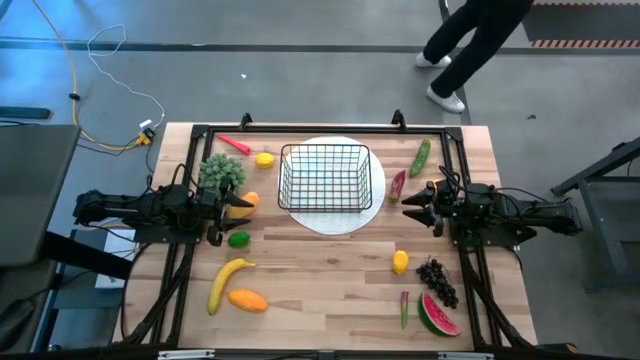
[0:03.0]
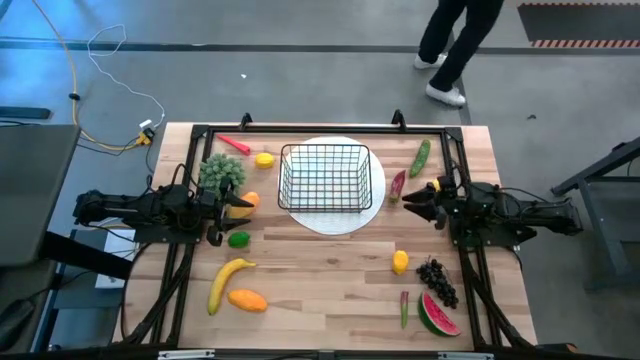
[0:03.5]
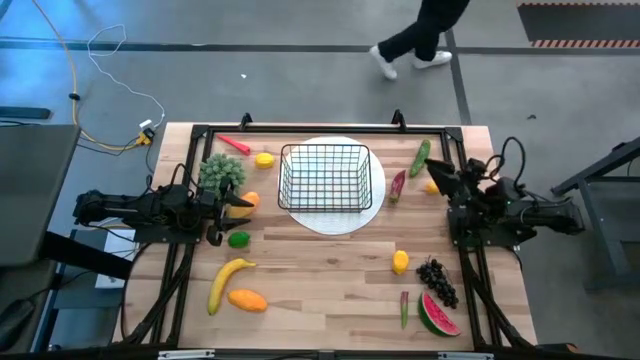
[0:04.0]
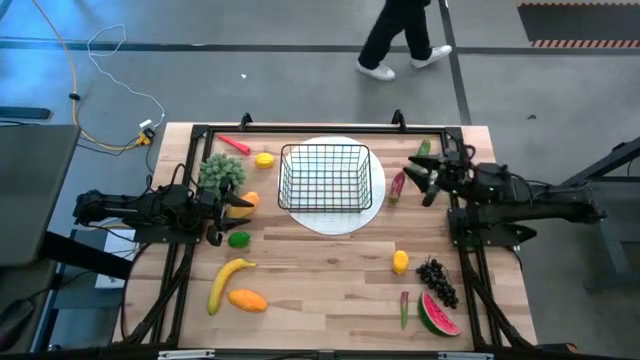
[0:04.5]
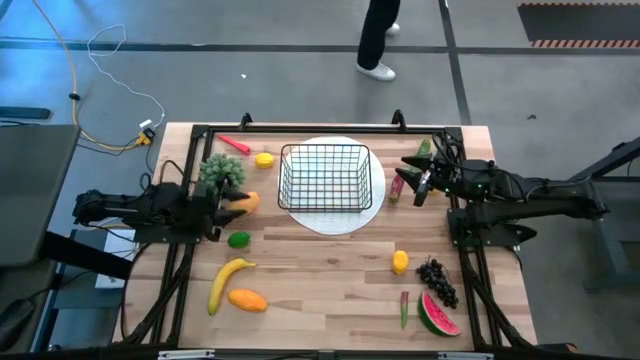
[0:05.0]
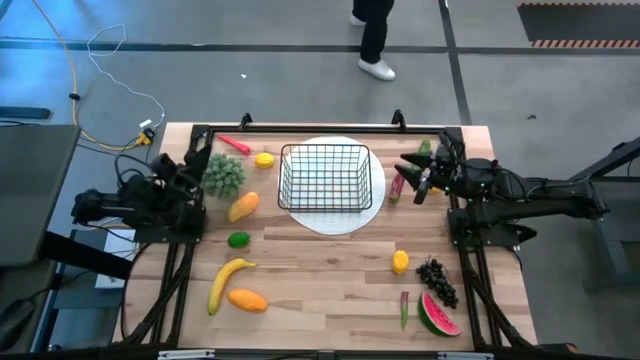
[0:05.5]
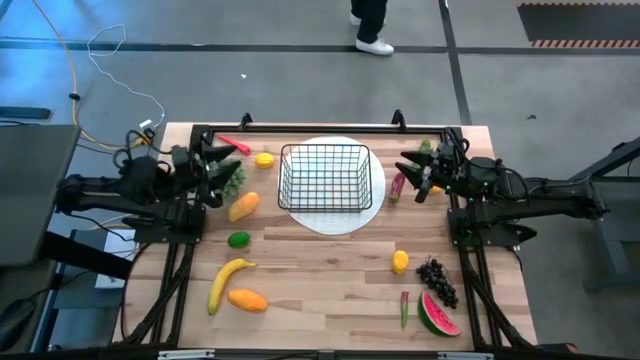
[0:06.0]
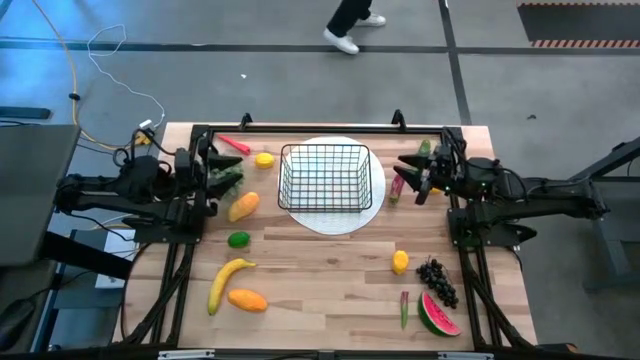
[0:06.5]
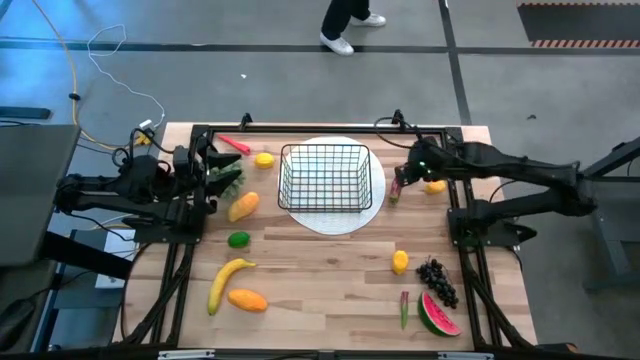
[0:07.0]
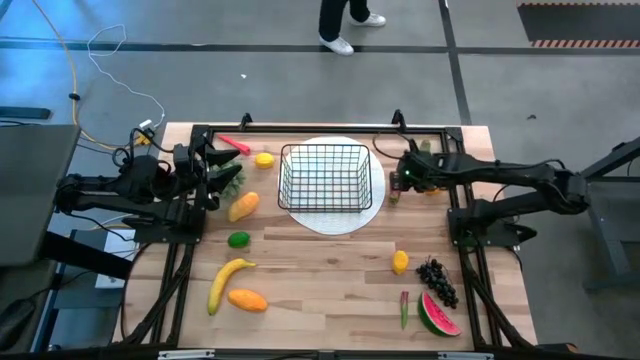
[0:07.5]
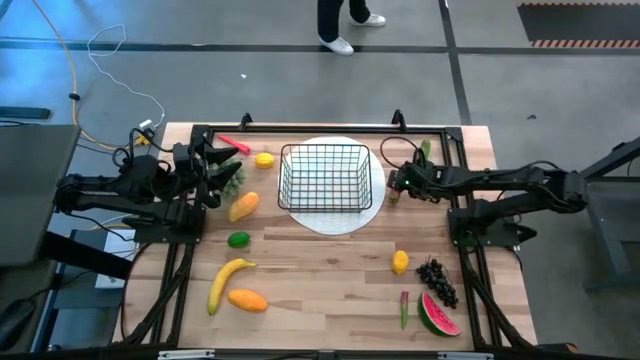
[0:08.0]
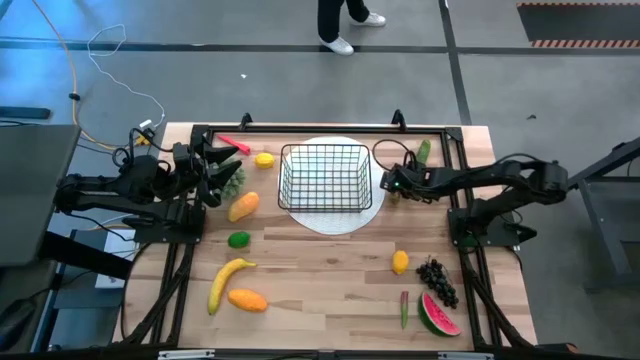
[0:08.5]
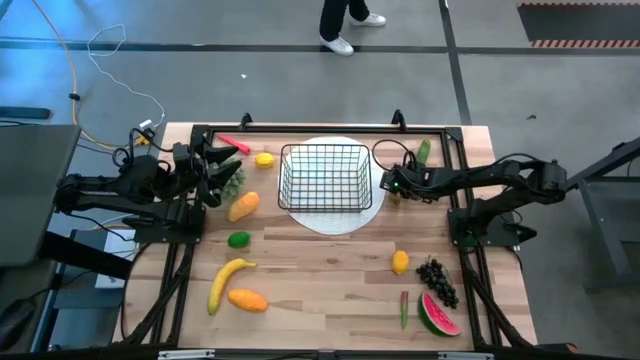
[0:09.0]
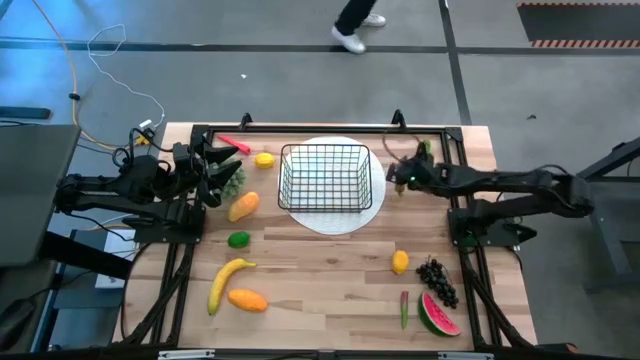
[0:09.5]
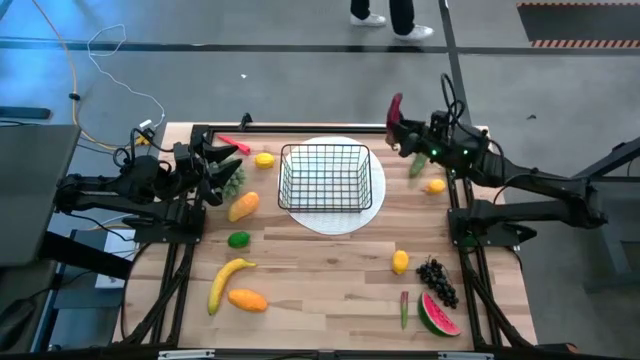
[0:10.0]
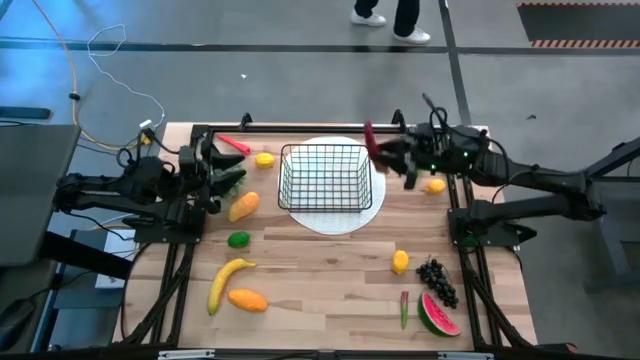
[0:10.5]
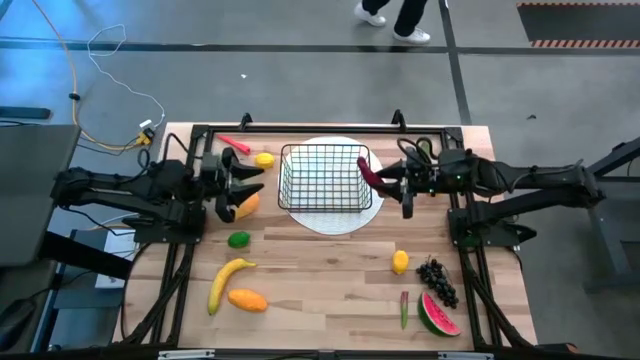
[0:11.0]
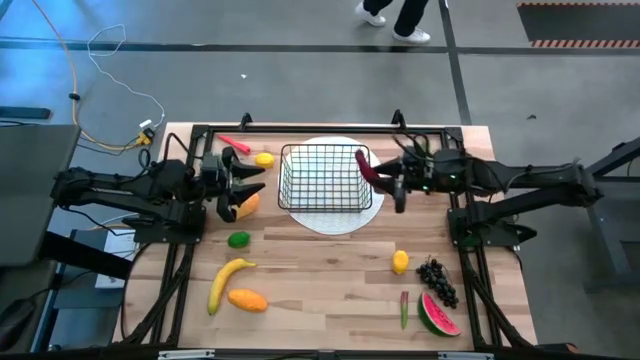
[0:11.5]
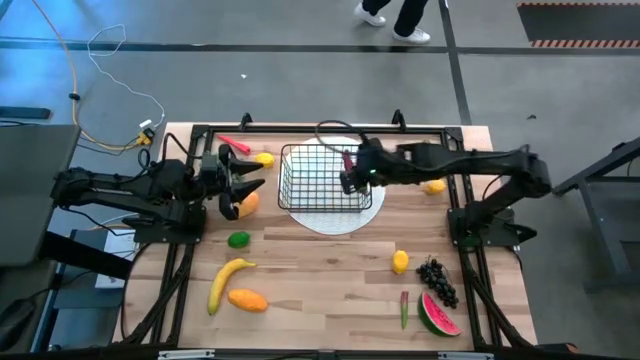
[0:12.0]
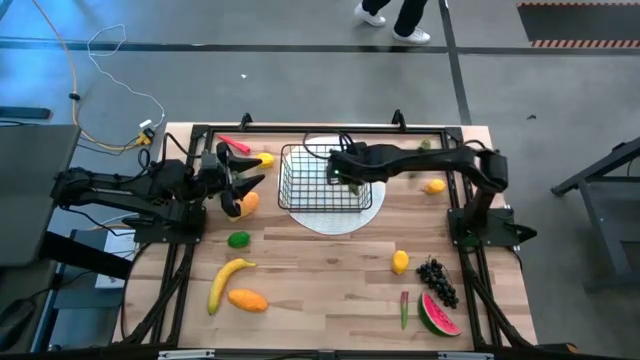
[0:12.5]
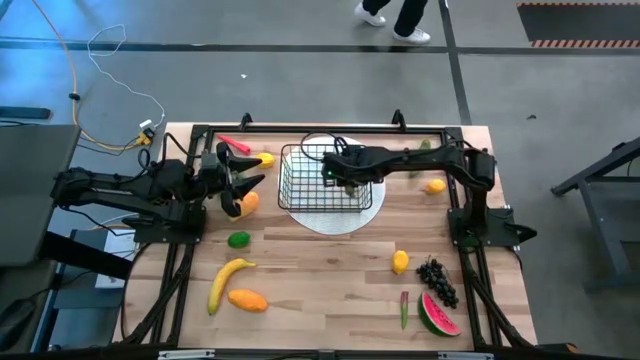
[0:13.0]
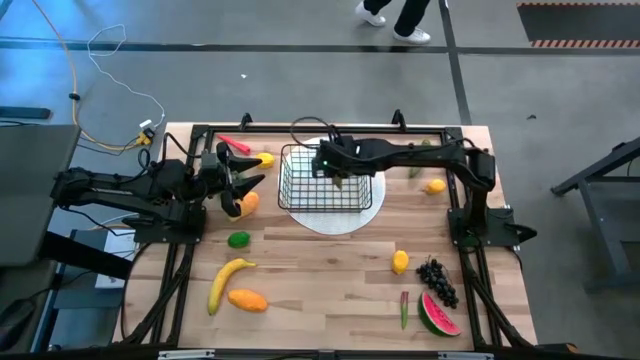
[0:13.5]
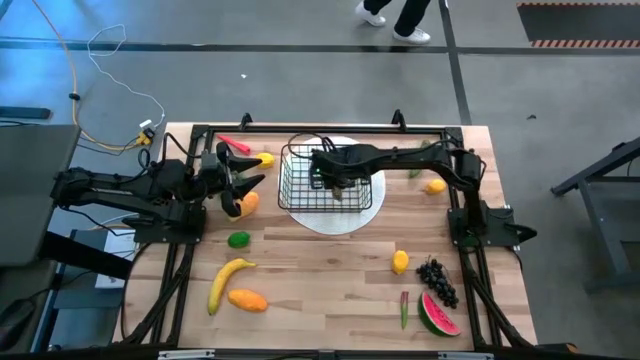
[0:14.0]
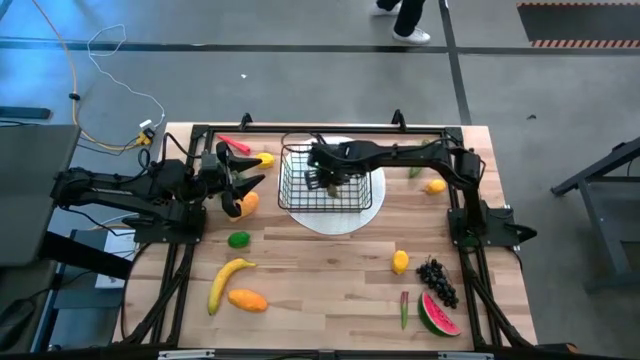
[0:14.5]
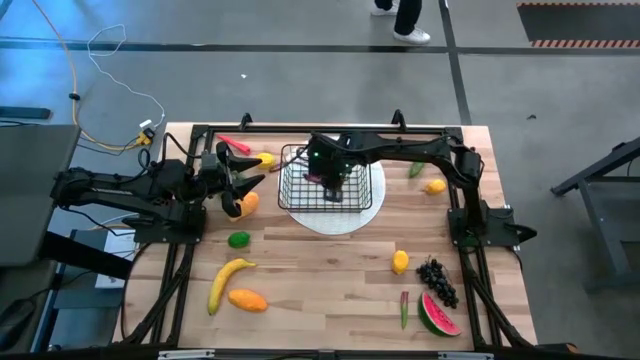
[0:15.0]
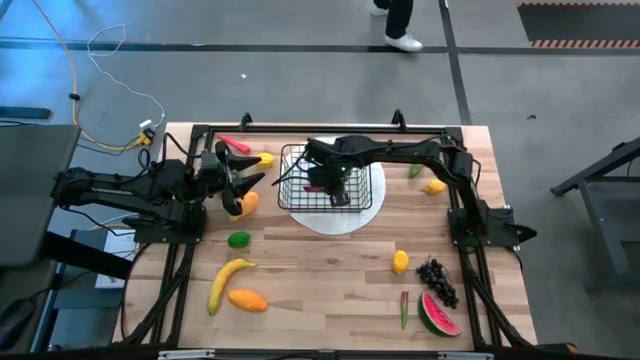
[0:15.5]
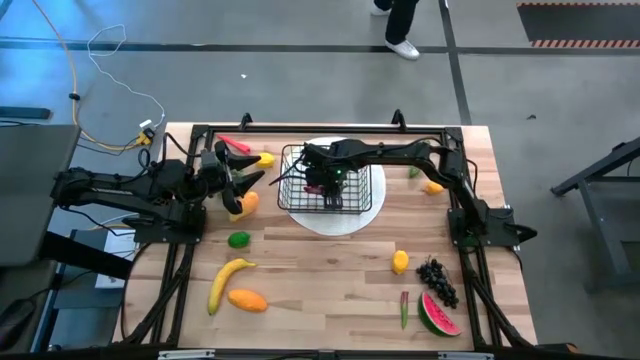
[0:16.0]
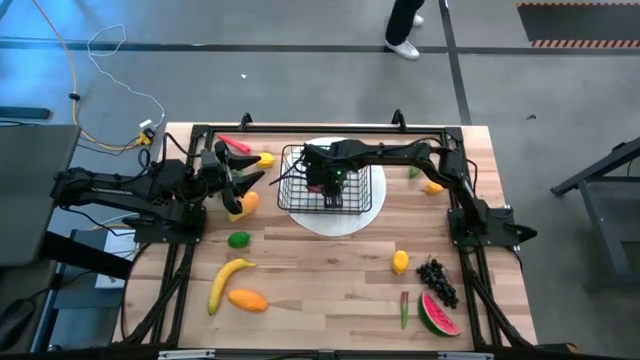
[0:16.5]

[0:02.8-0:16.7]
Task: Build produce basket
Put the red chili pepper into the wire basket

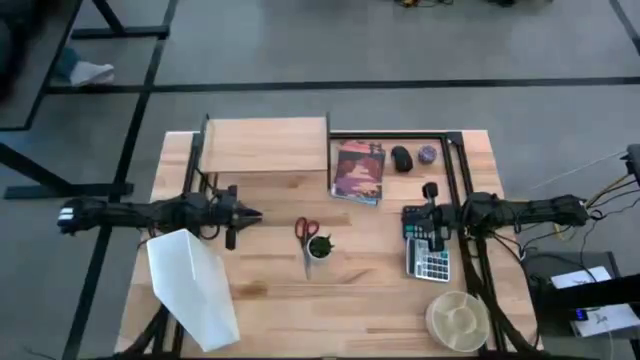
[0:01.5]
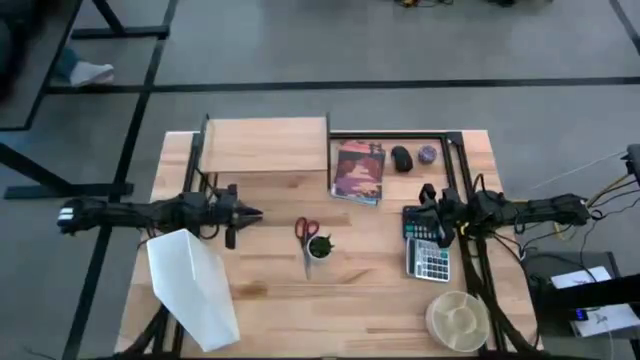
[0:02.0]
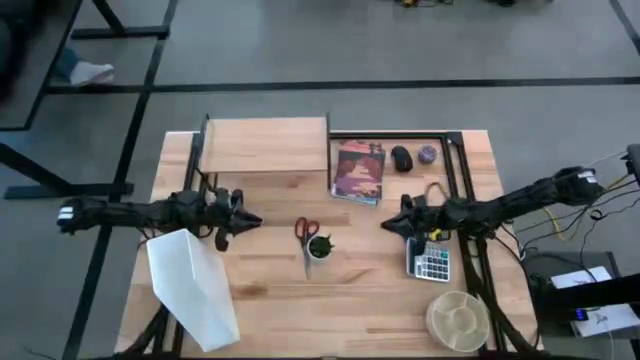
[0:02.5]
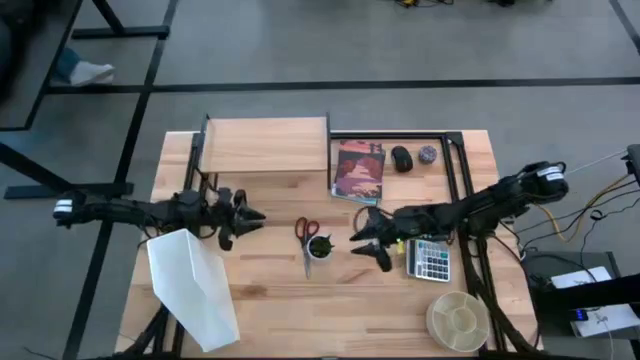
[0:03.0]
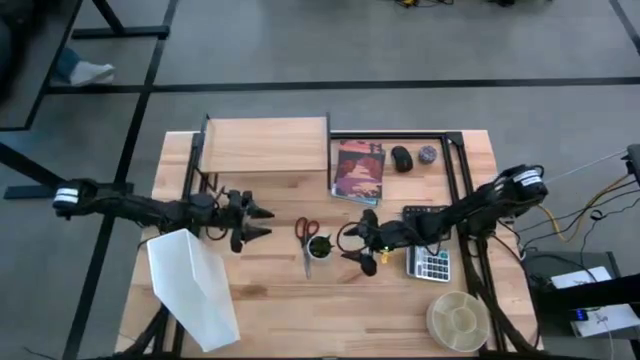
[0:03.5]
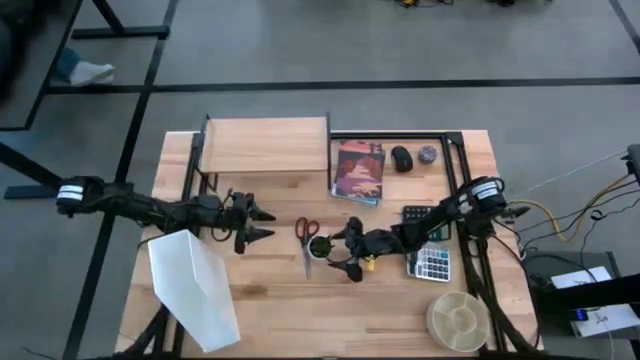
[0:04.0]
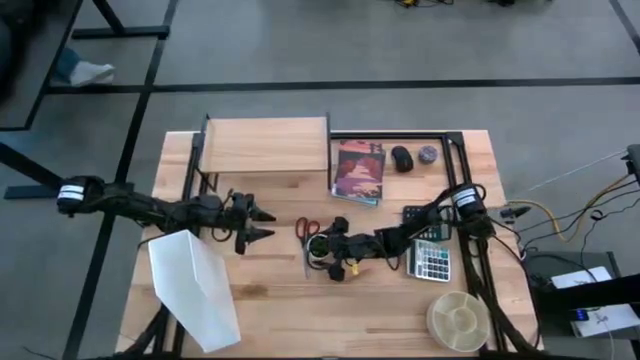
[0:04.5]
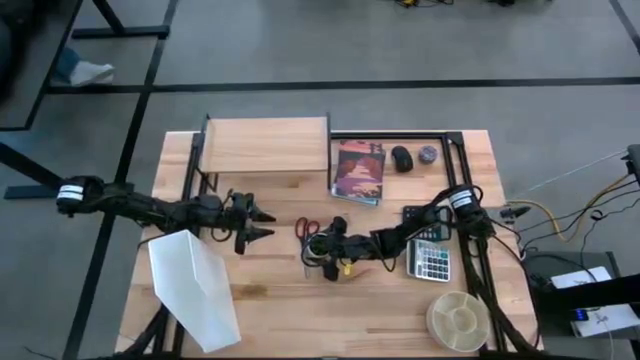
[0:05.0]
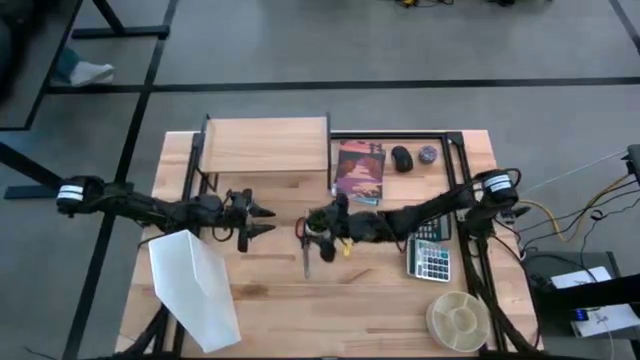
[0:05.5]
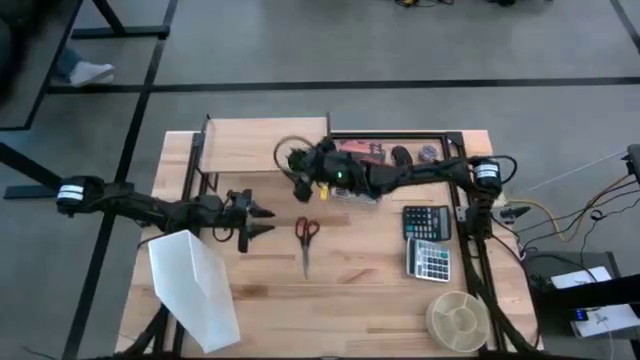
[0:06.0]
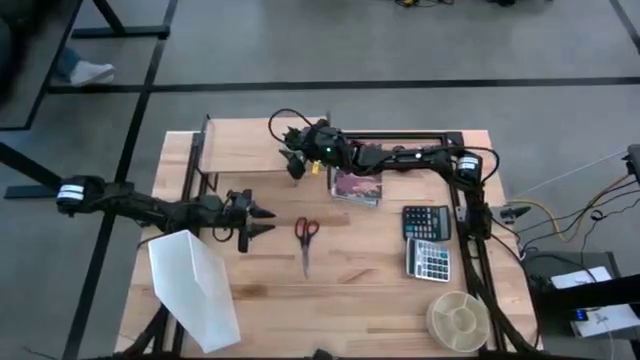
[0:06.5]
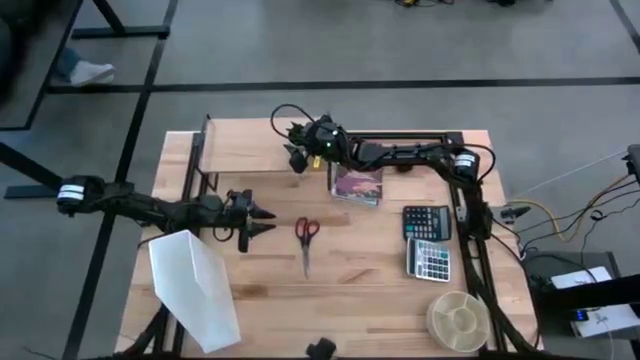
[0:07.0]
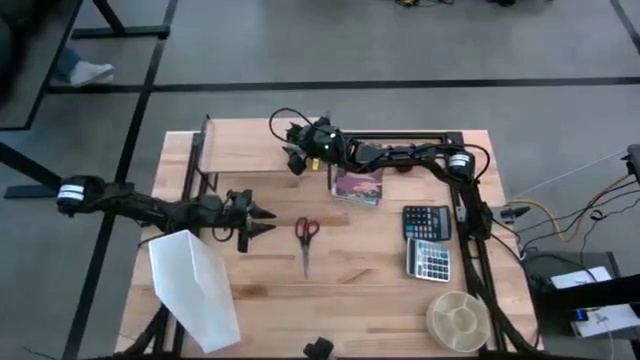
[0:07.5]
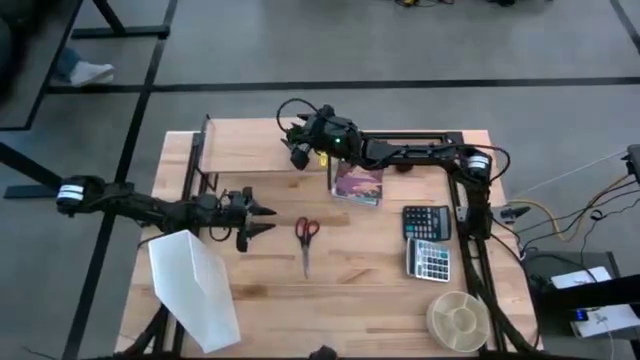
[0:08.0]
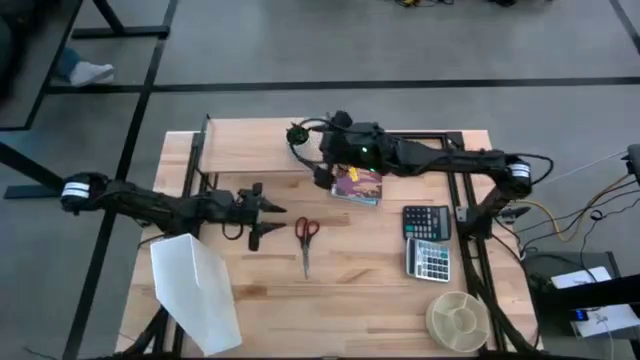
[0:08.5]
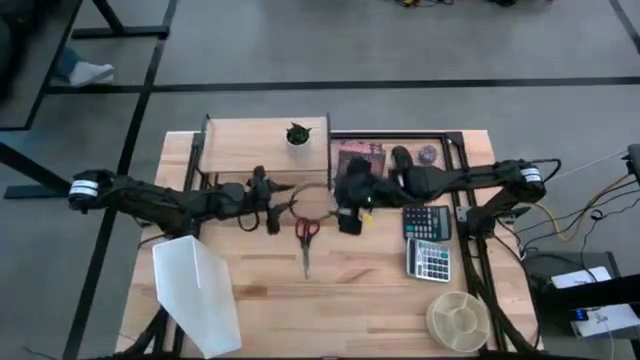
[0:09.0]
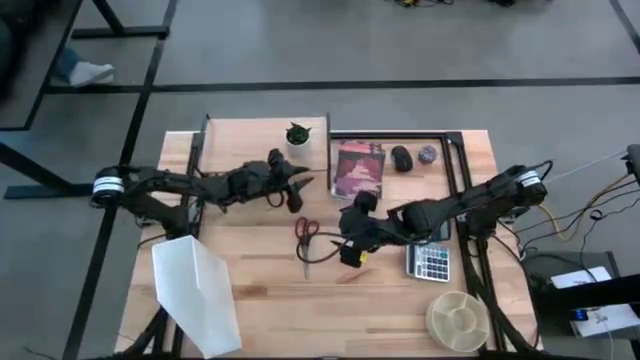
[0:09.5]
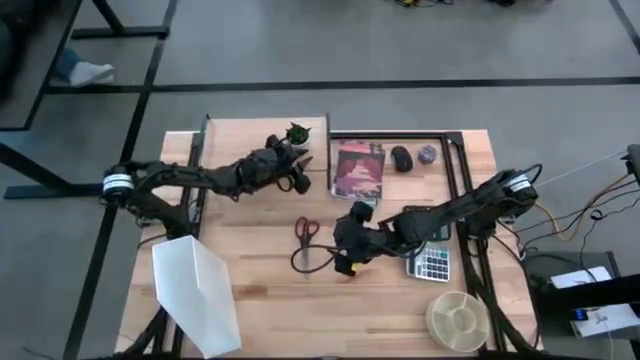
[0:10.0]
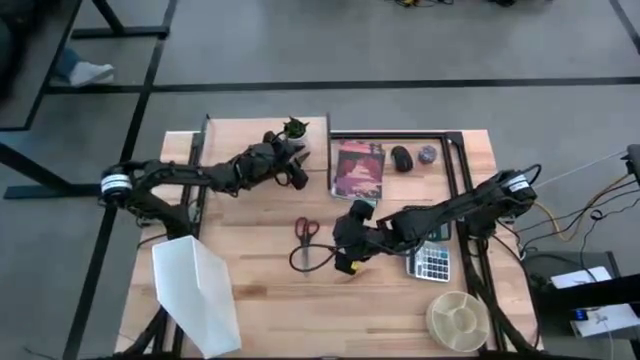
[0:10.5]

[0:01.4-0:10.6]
Task: Stock shelves
Put the flower pot on the shelf
